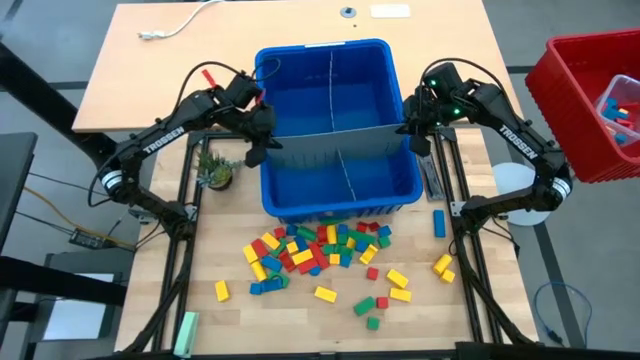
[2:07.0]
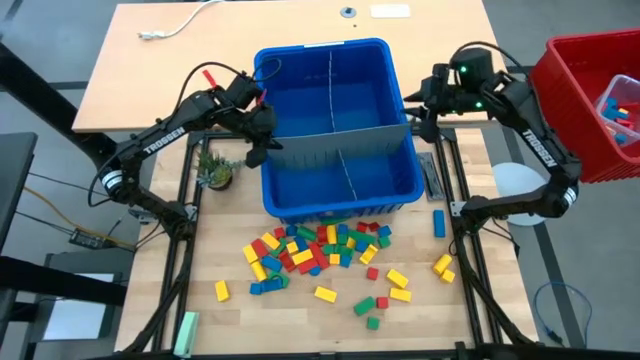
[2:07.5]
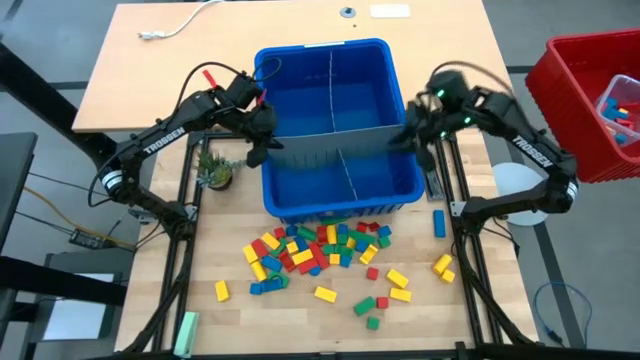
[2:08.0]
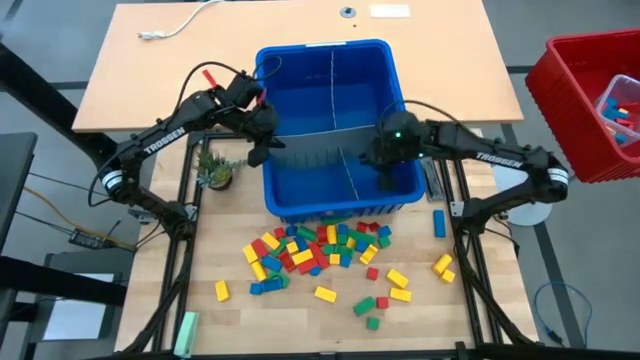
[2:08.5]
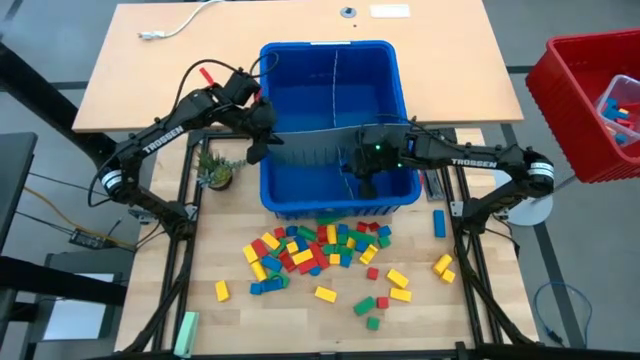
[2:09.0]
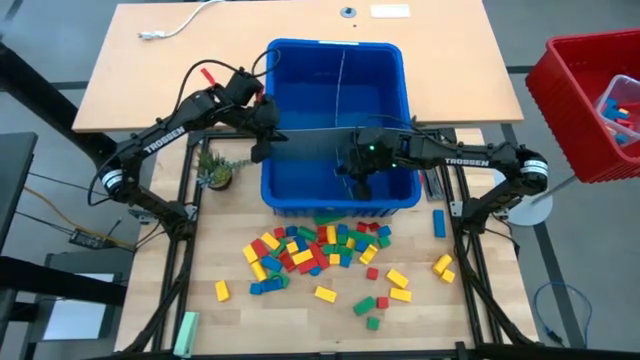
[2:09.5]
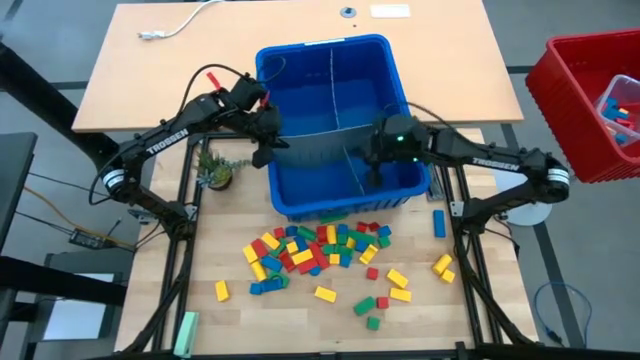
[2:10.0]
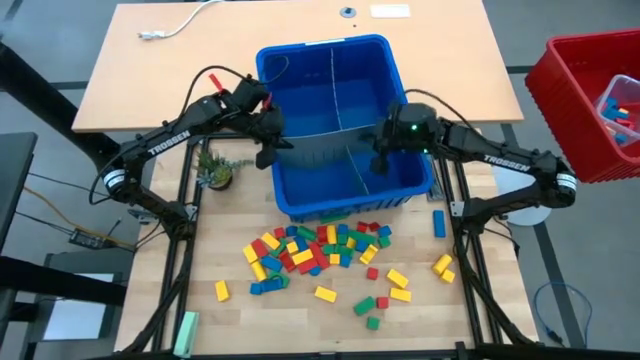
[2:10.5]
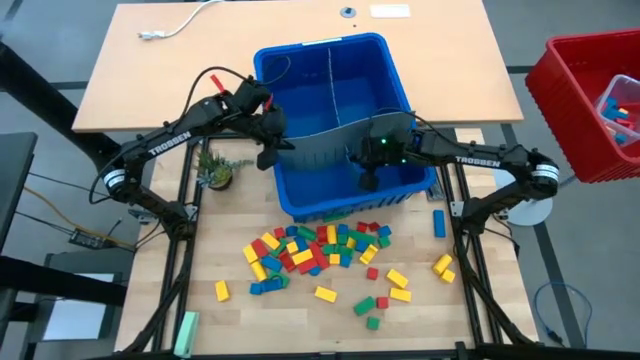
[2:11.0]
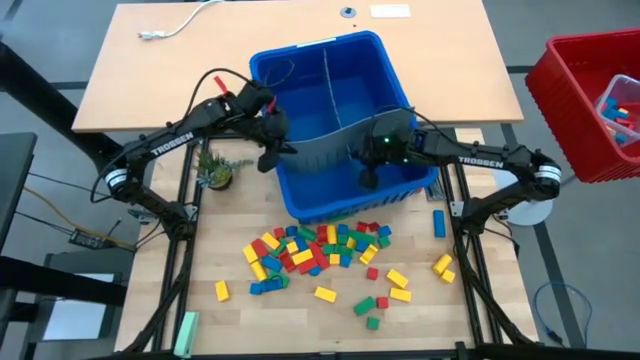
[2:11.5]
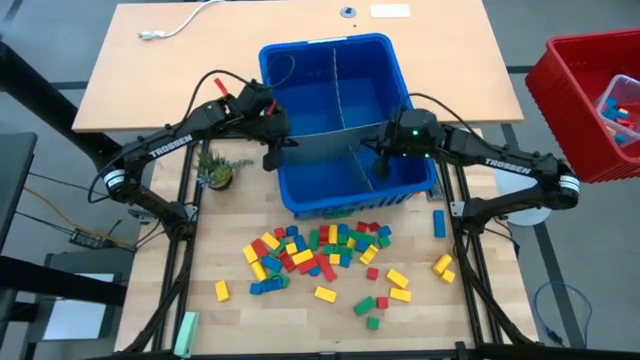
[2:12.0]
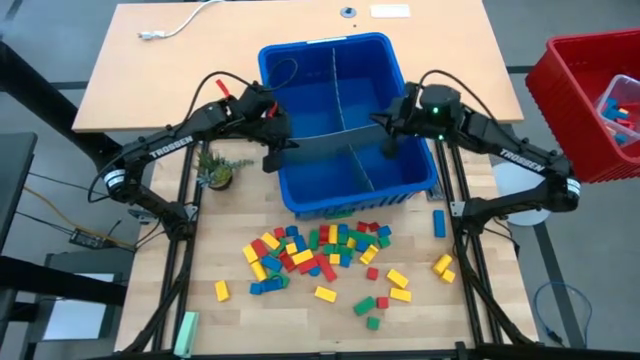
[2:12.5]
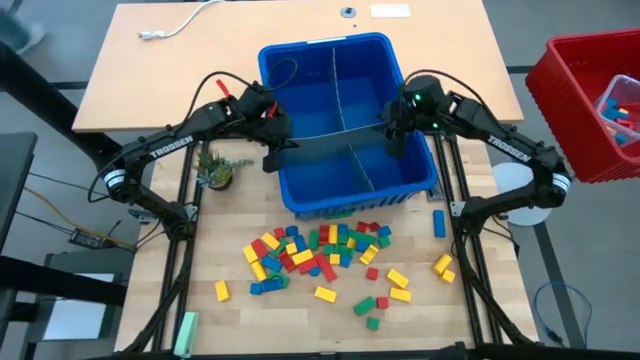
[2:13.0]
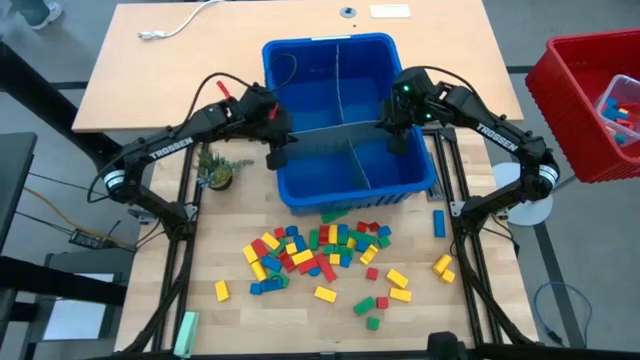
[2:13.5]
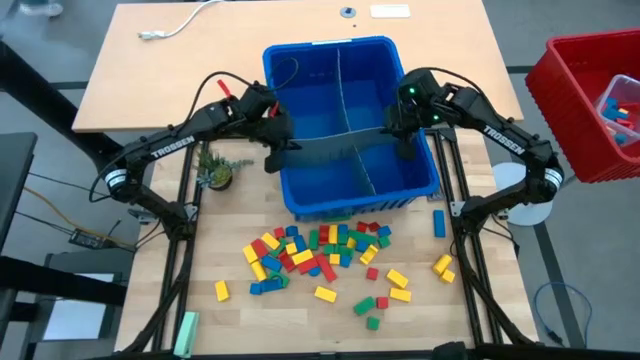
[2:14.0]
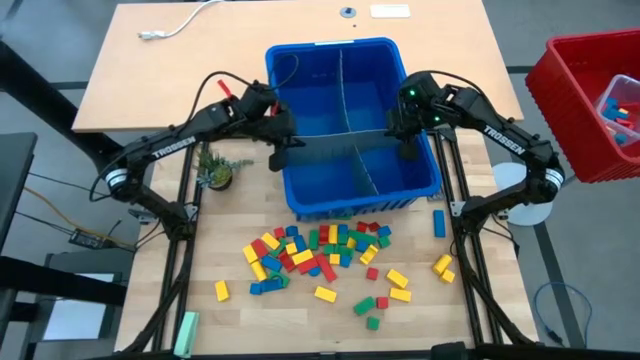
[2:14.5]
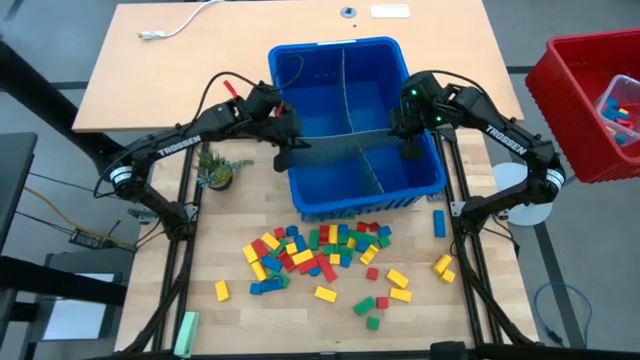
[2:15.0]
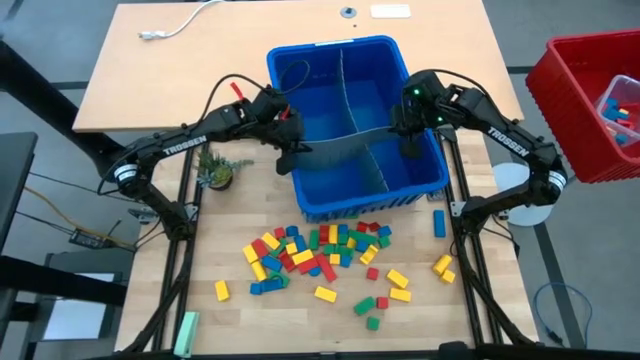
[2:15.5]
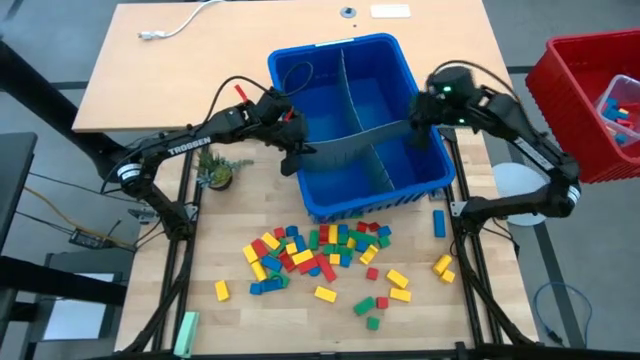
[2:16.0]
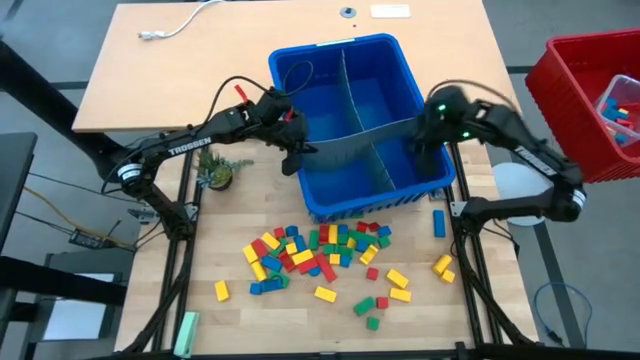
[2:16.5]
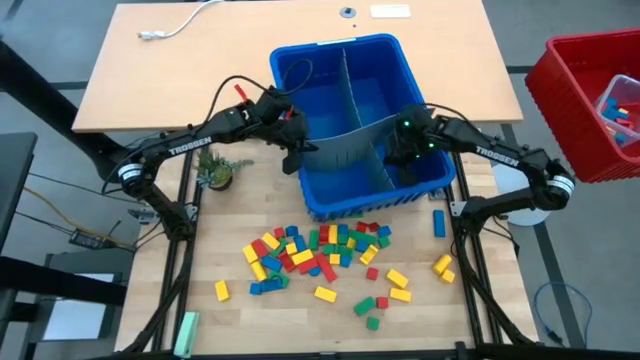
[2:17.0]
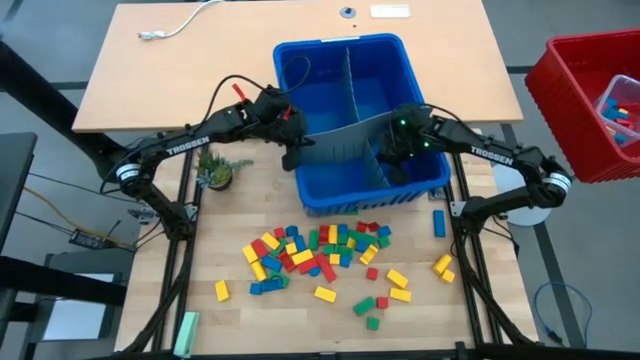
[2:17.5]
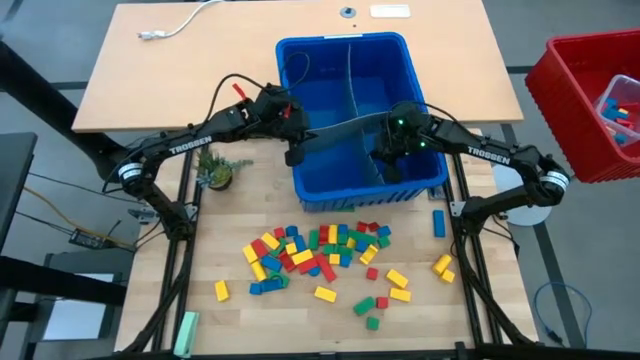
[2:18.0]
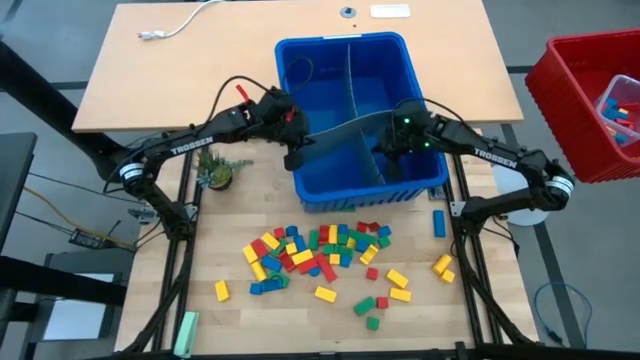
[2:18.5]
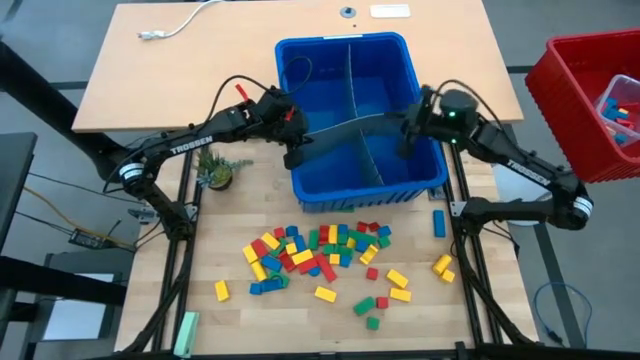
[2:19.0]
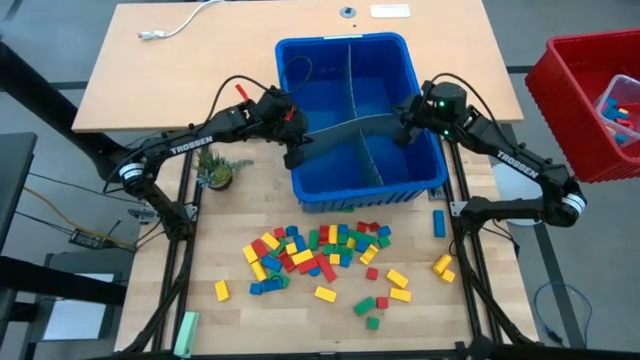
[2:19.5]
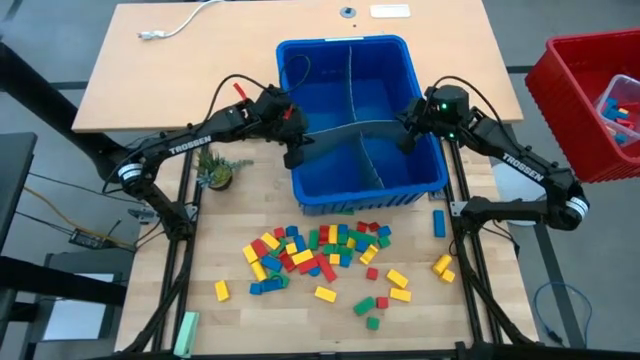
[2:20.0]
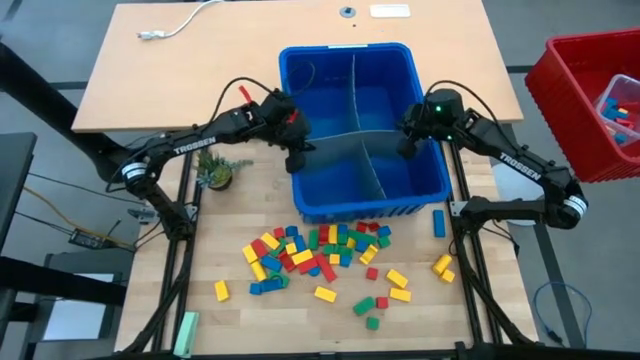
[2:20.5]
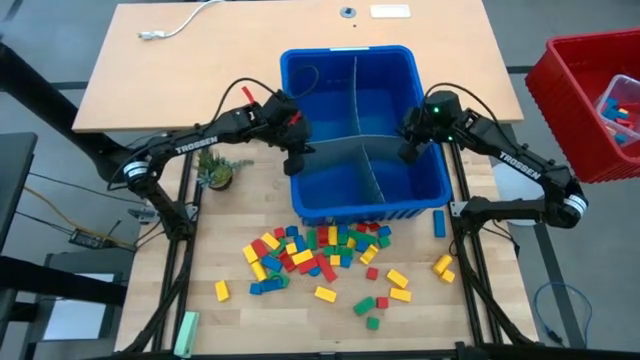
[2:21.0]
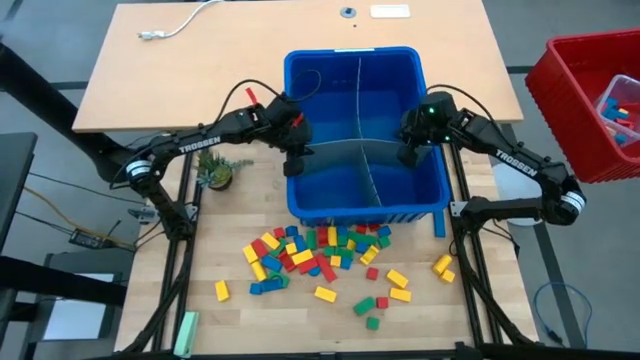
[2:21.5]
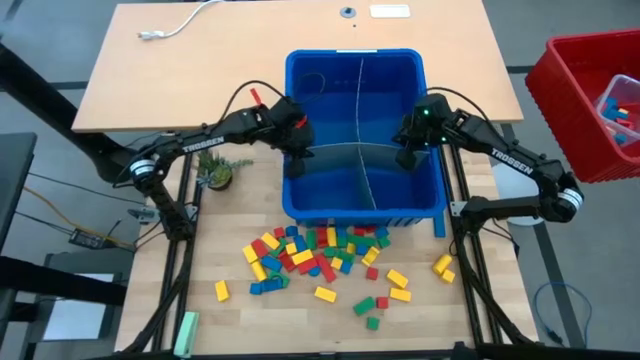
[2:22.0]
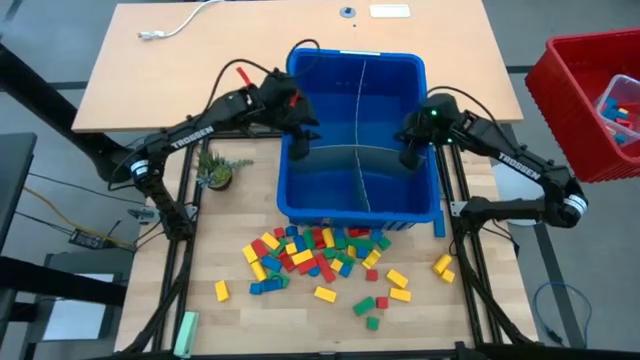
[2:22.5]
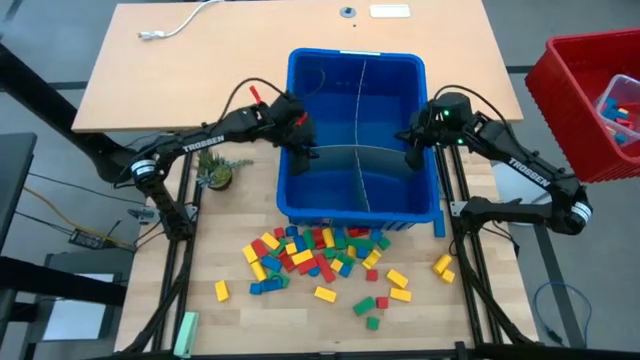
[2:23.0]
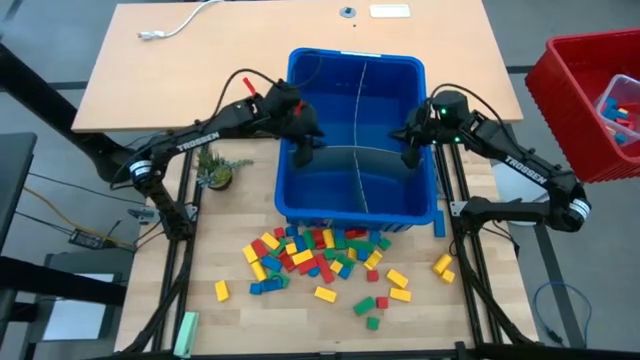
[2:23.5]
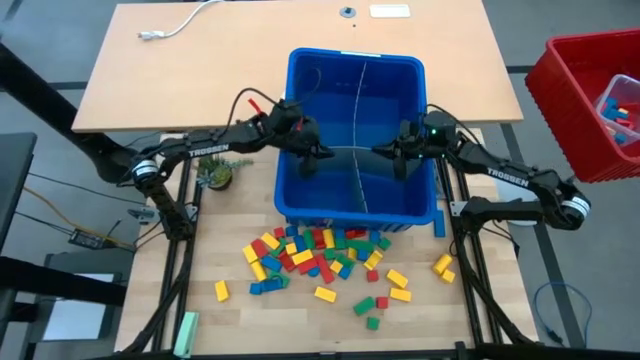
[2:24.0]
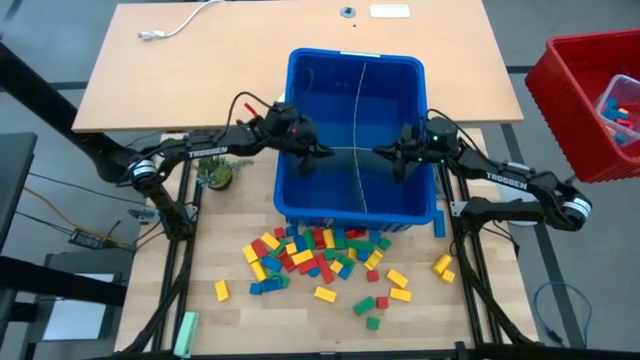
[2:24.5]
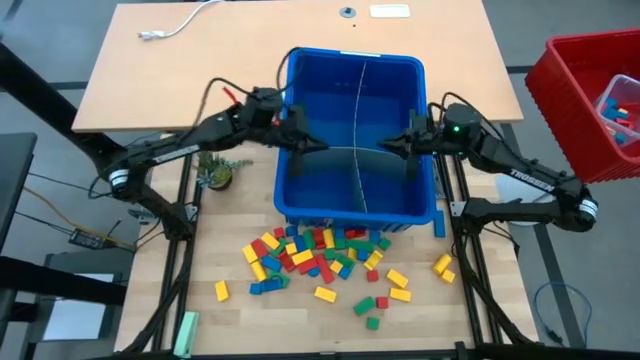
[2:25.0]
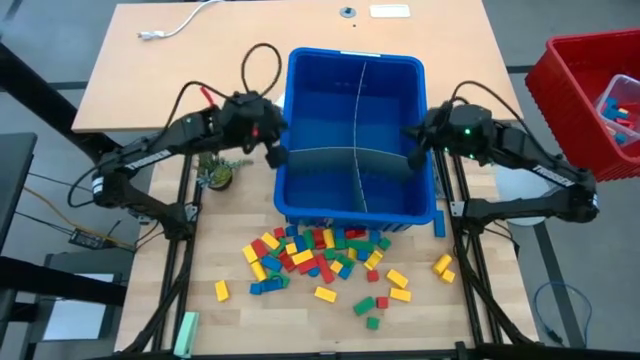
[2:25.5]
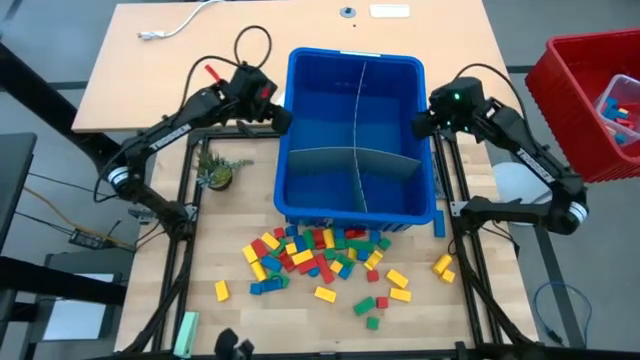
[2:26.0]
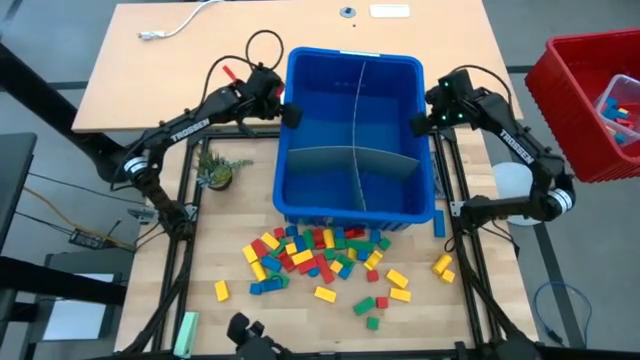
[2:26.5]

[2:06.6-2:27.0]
Task: Sort blocks
Assemble the blue bin using gray bin divider
